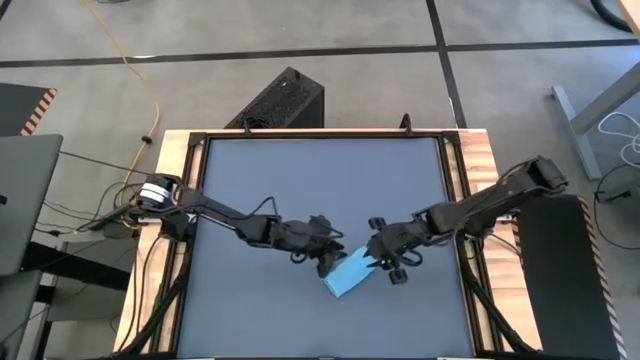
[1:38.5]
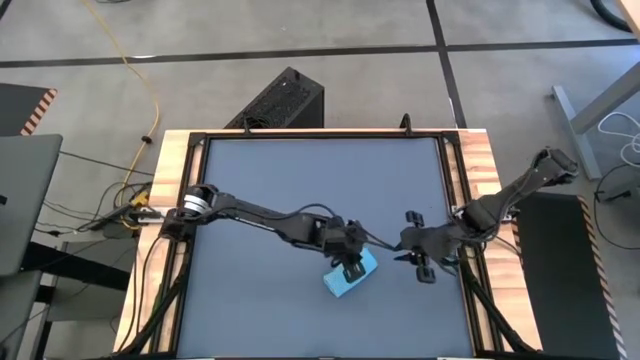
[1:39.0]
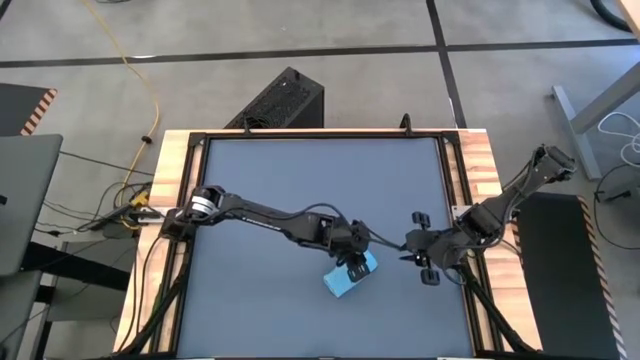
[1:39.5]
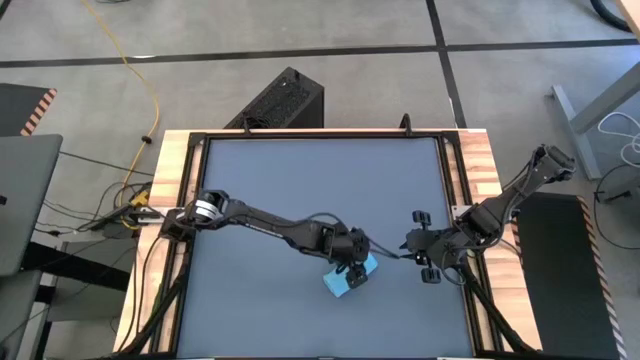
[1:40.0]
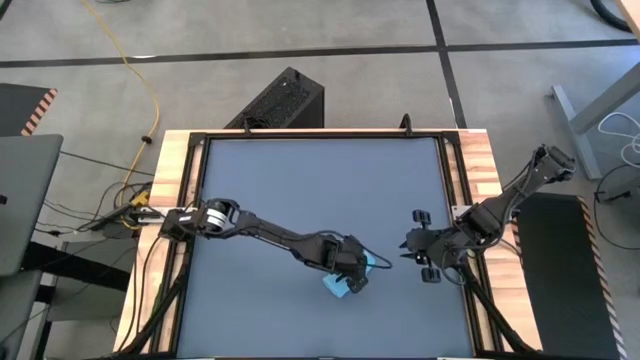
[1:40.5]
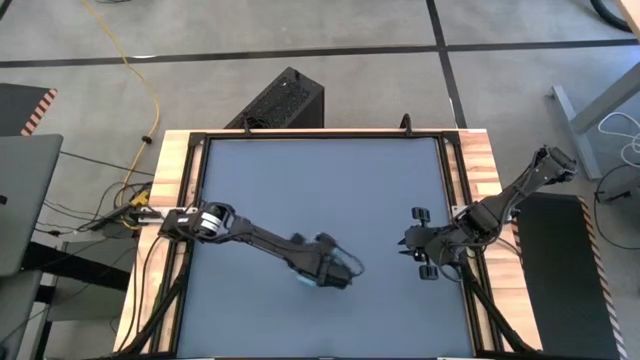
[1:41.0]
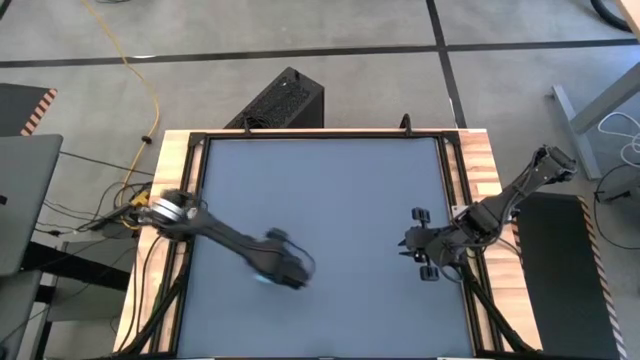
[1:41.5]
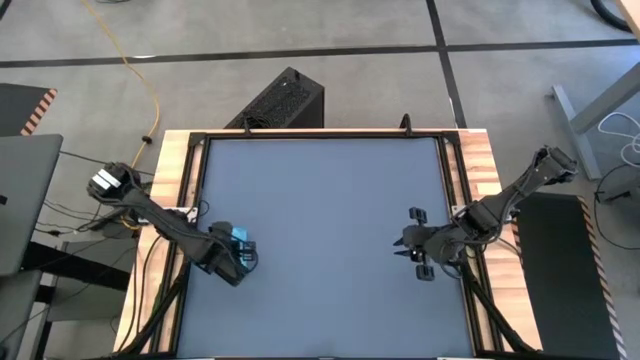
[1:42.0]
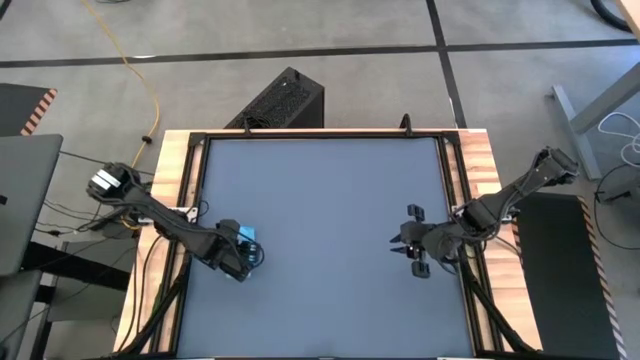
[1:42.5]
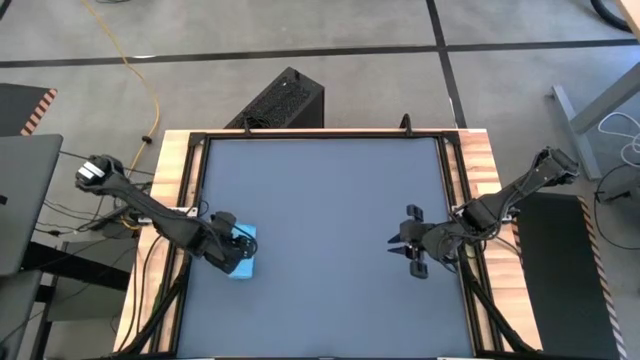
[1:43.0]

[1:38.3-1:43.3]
Task: Roll towel into tight, uniform cylinder
Move the blue microfiber cloth to the middle left of the table

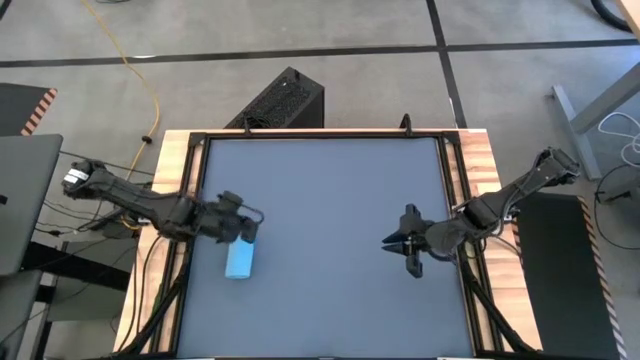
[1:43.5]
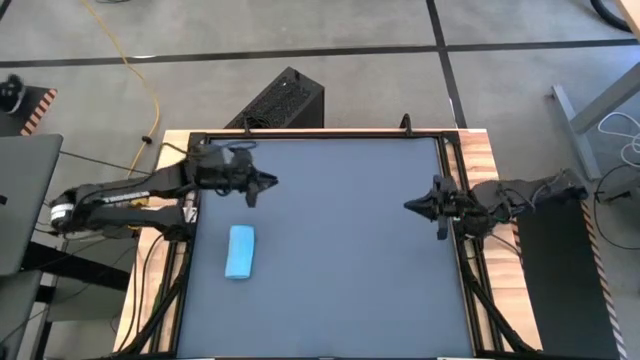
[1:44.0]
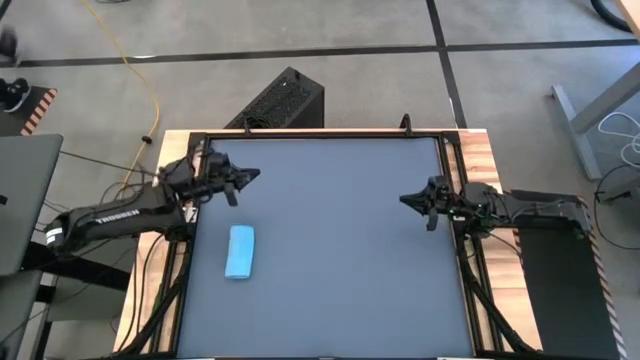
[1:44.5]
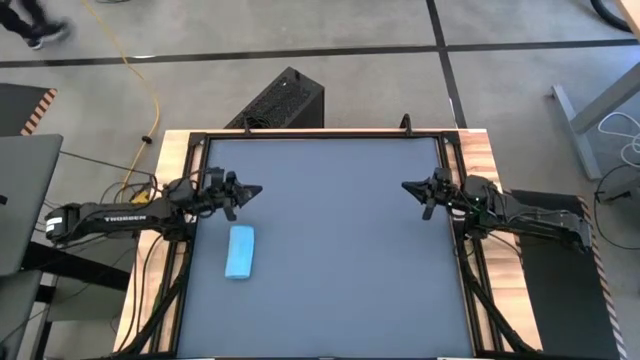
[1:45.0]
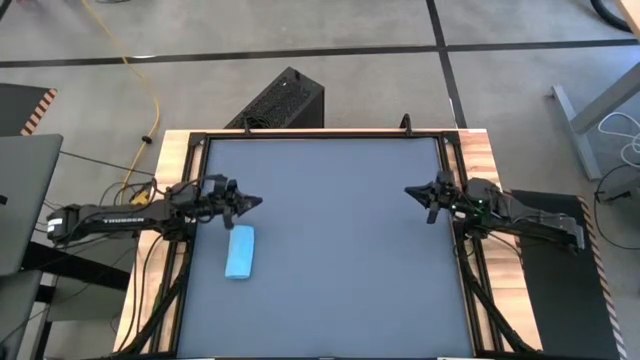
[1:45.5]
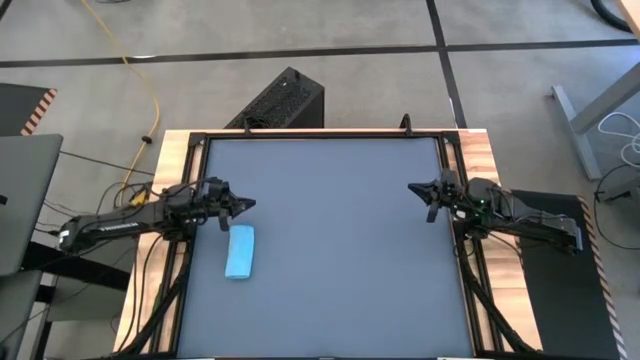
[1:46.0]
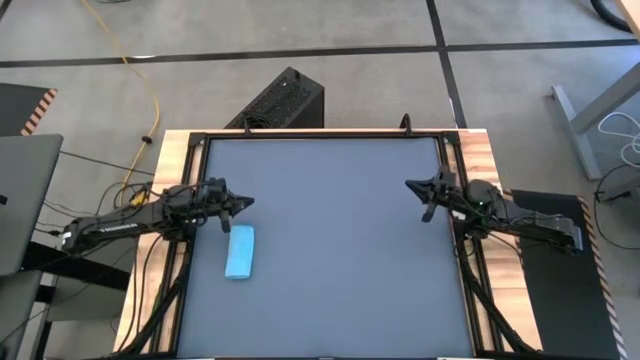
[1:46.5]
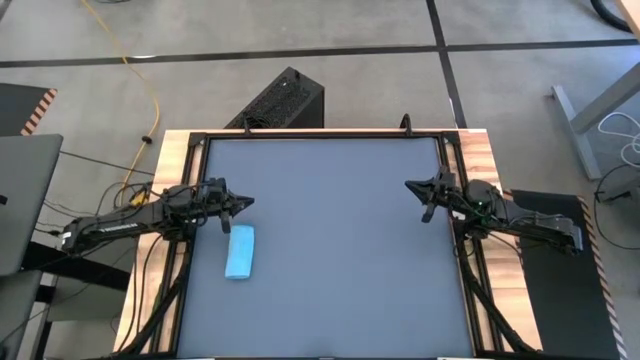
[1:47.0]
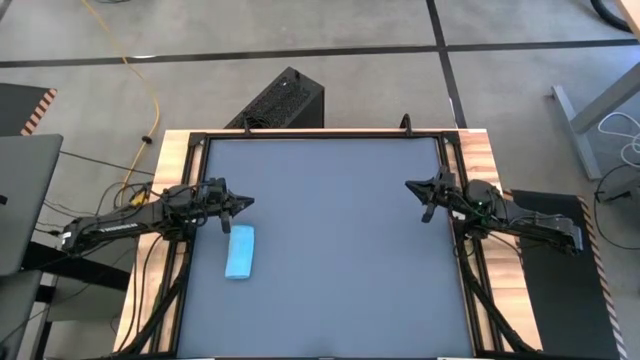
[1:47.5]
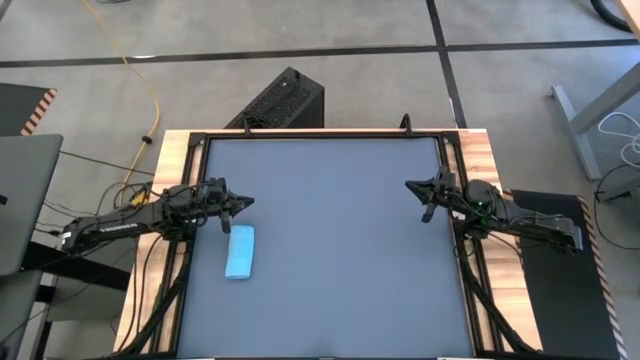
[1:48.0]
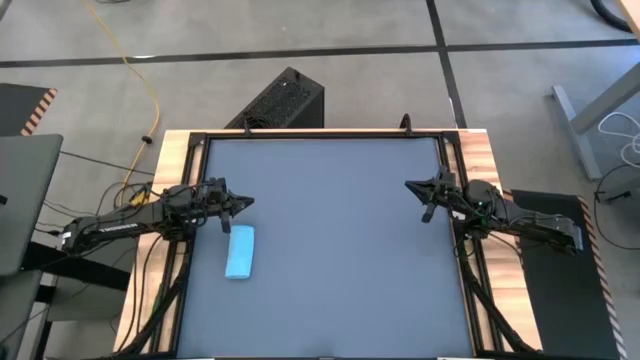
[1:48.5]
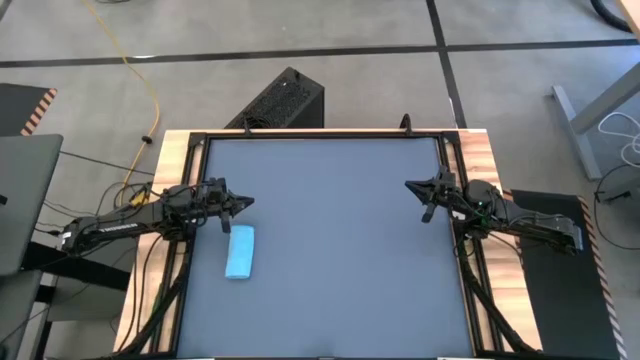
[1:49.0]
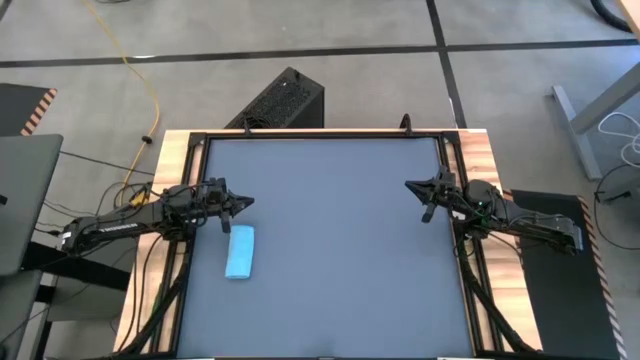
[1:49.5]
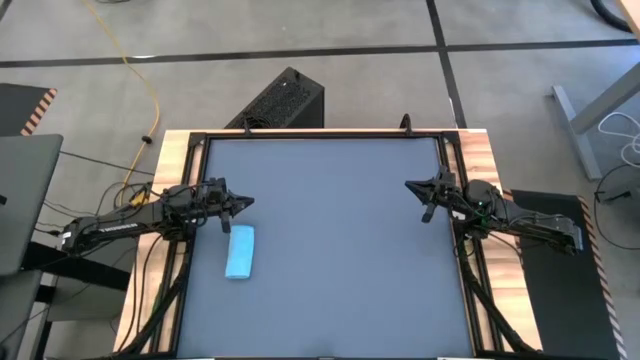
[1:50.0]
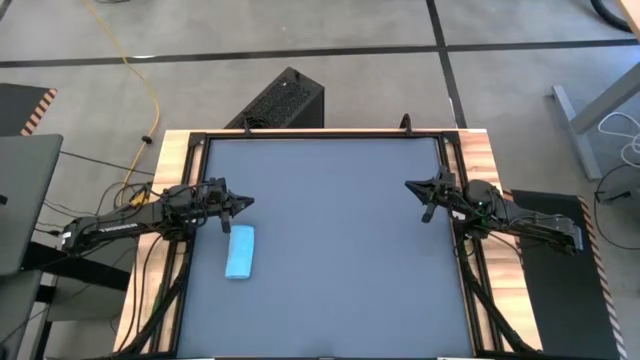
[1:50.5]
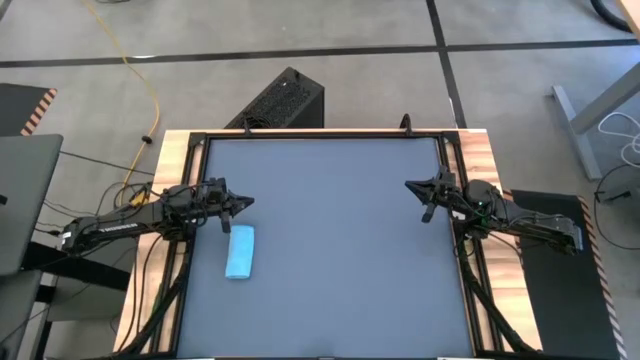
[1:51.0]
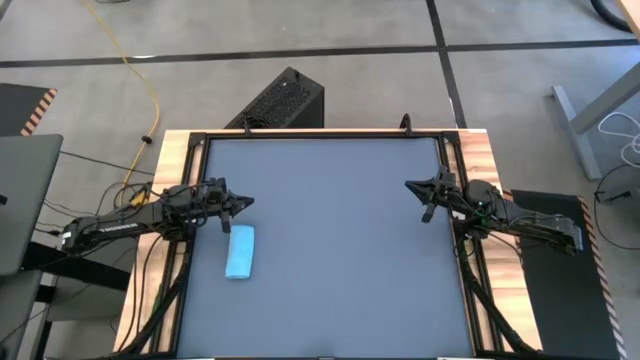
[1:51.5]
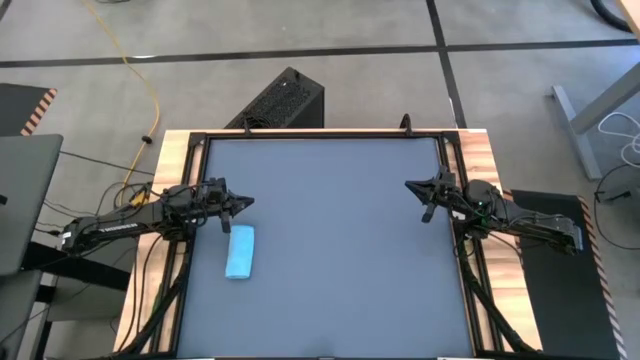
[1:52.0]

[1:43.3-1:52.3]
Return to Home Position

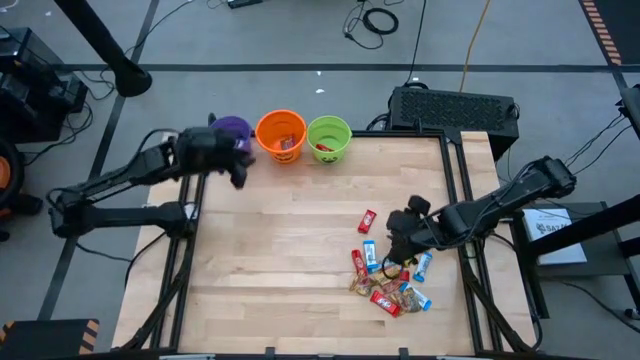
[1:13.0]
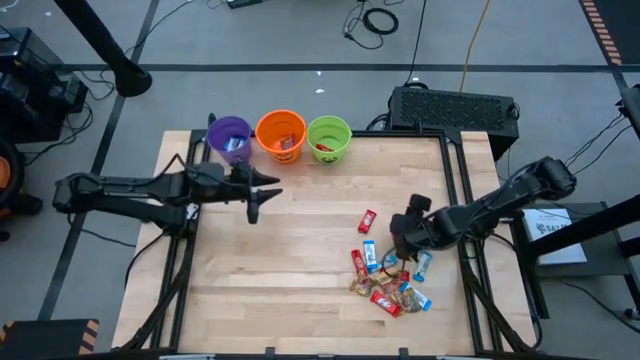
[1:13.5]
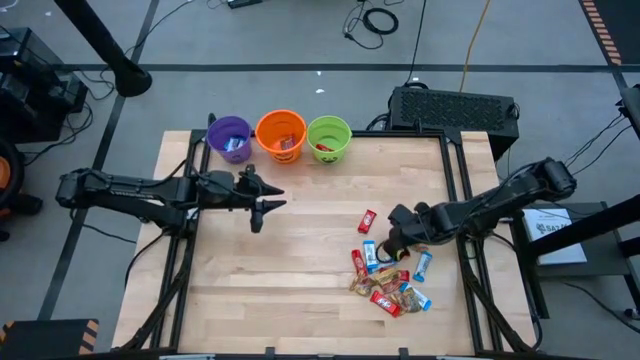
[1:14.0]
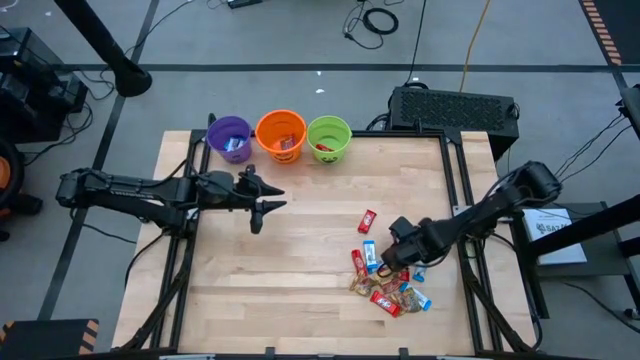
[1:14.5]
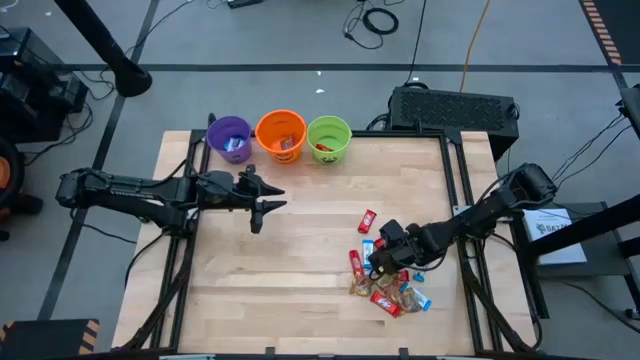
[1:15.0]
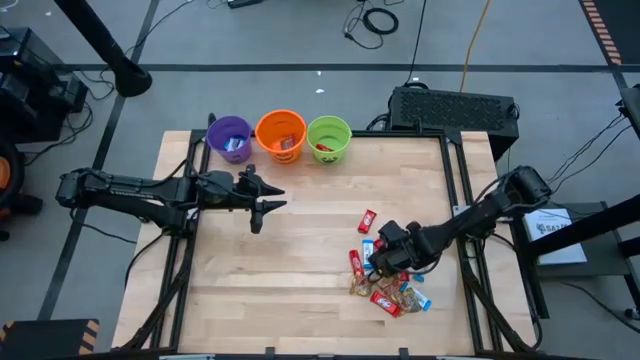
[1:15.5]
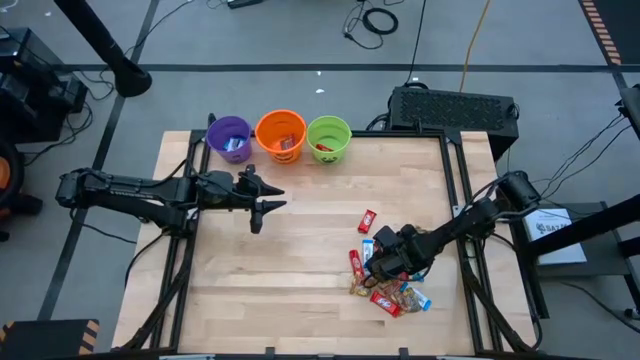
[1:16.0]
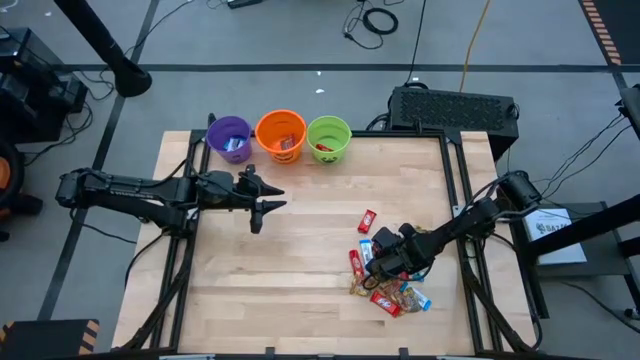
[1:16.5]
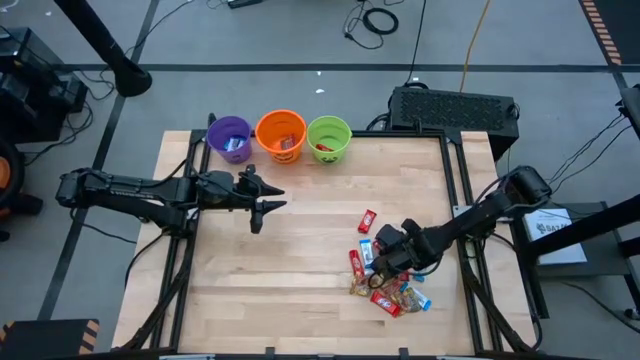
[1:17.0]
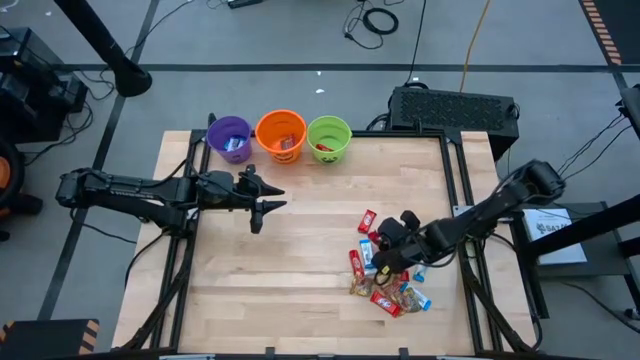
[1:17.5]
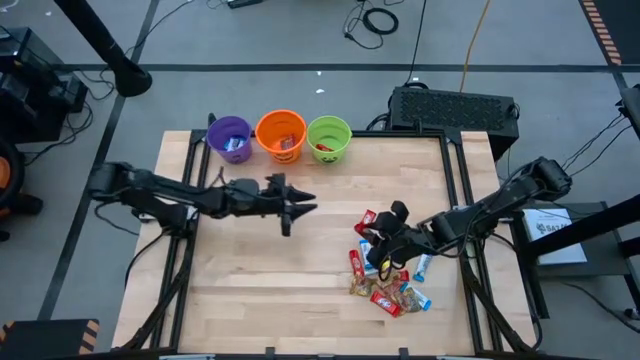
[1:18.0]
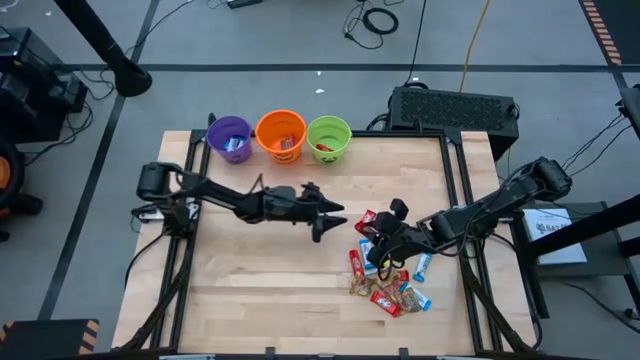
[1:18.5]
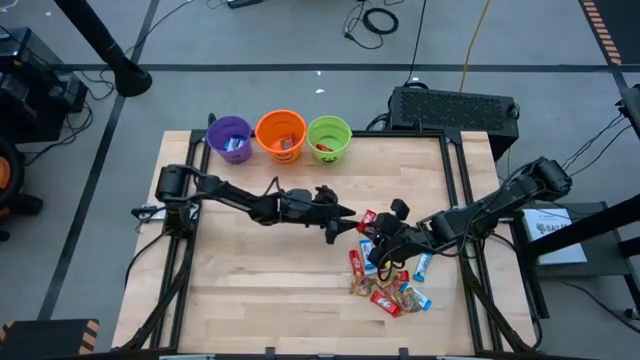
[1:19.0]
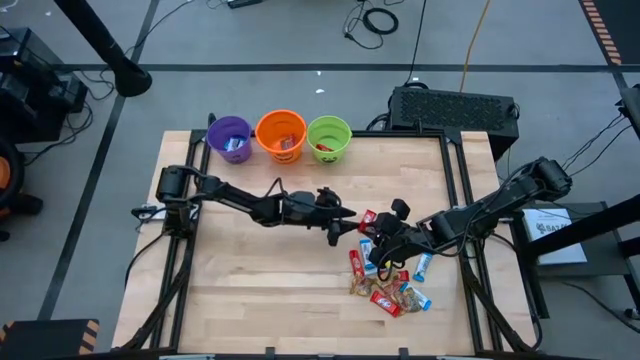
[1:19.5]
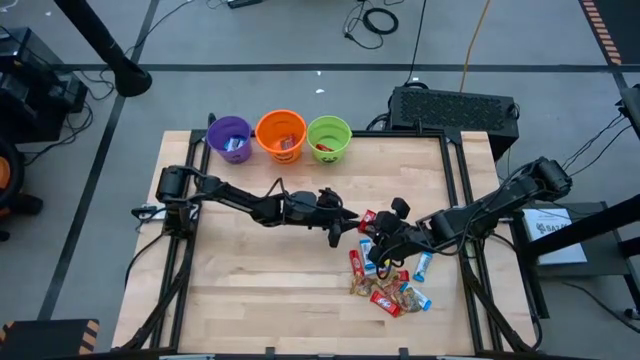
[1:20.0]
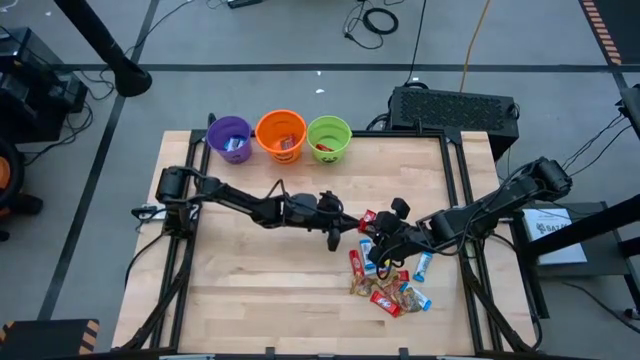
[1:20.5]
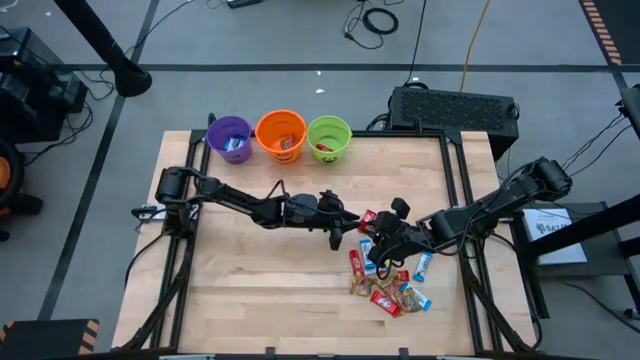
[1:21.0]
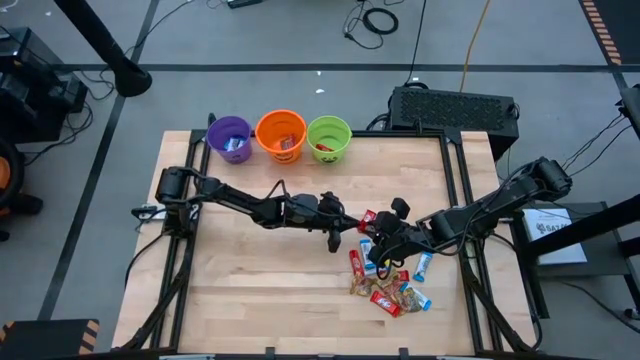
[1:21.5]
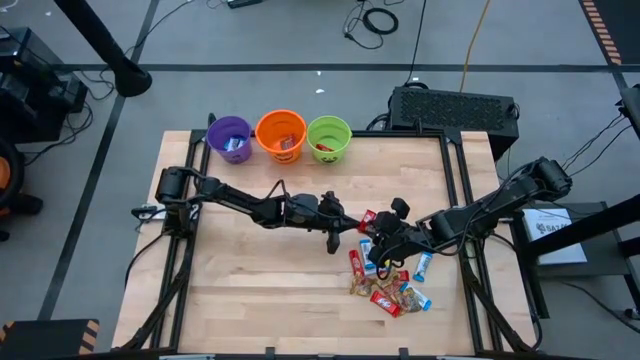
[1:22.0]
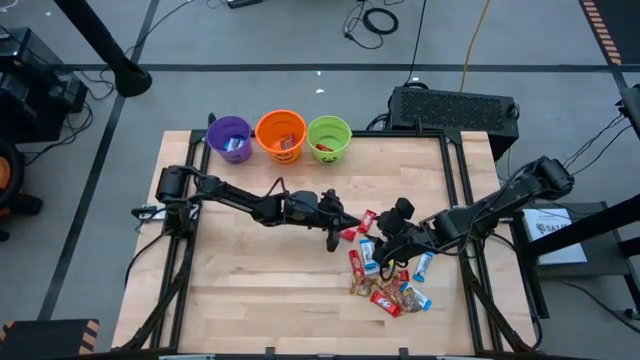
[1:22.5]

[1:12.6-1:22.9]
Task: Sort candy by brand, put in halloween buckets
Put the red chocolate bar into the green bucket
